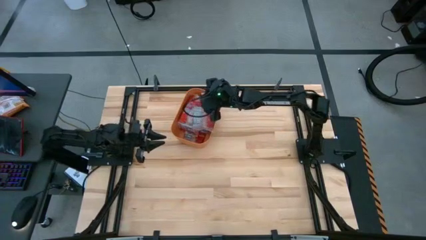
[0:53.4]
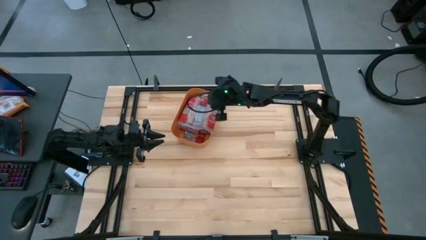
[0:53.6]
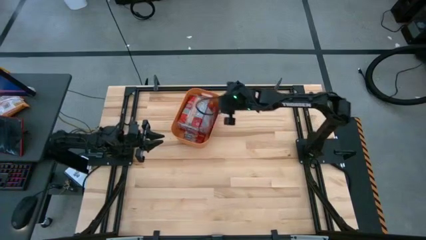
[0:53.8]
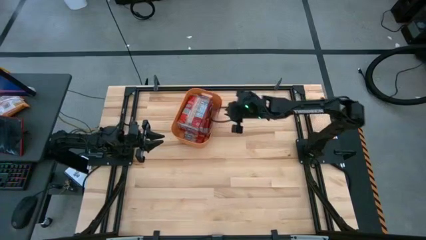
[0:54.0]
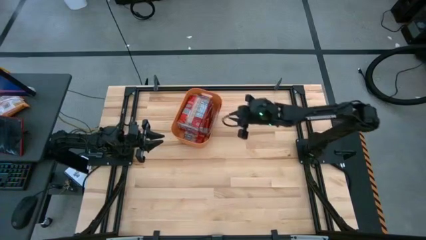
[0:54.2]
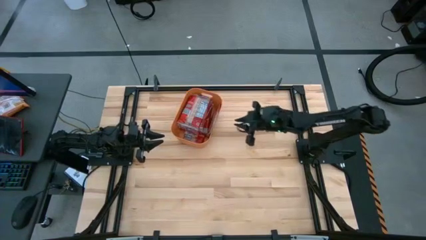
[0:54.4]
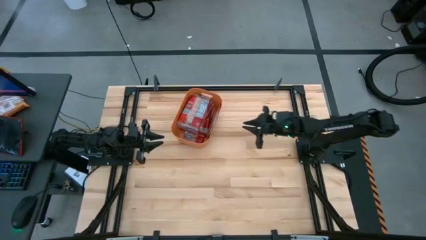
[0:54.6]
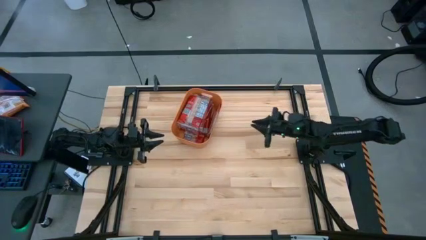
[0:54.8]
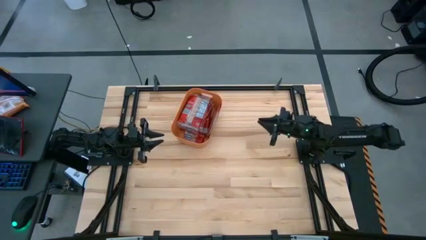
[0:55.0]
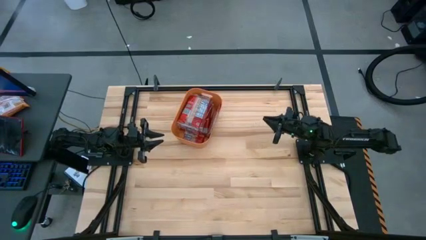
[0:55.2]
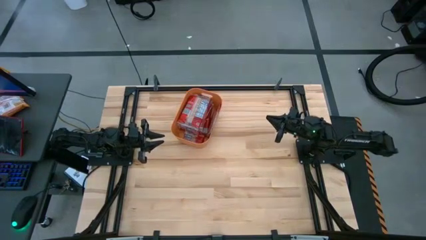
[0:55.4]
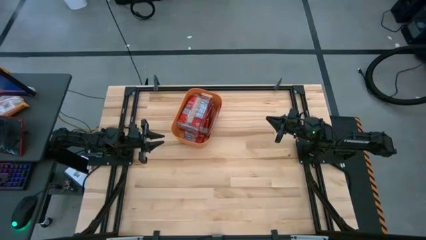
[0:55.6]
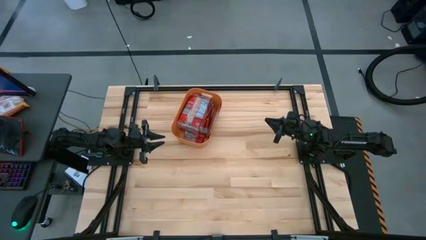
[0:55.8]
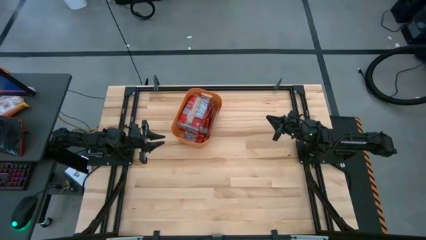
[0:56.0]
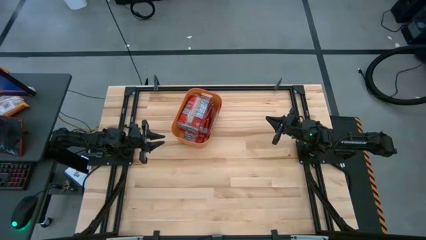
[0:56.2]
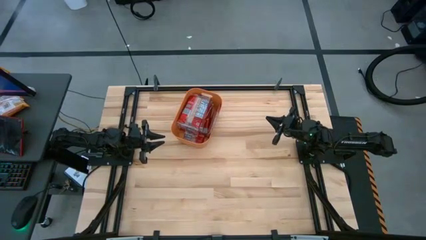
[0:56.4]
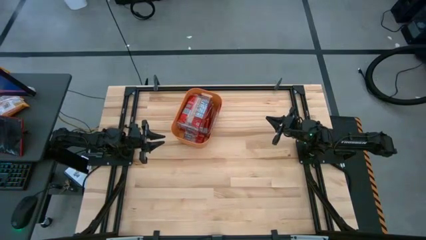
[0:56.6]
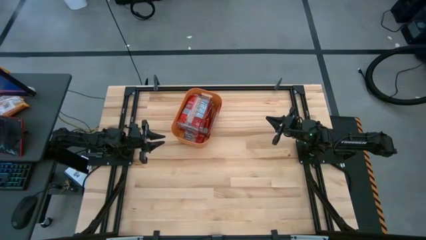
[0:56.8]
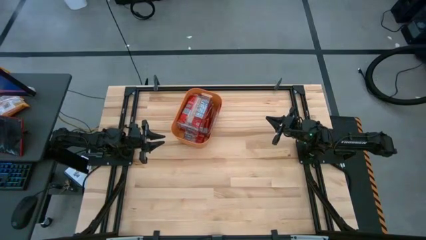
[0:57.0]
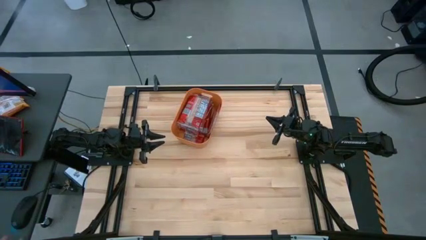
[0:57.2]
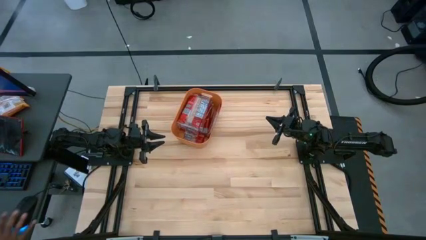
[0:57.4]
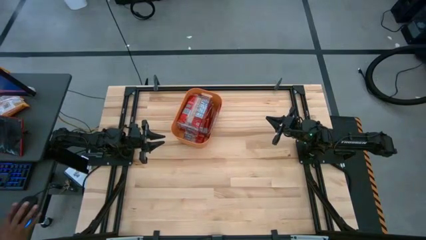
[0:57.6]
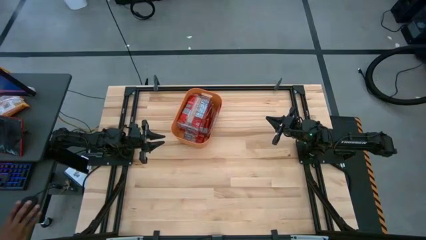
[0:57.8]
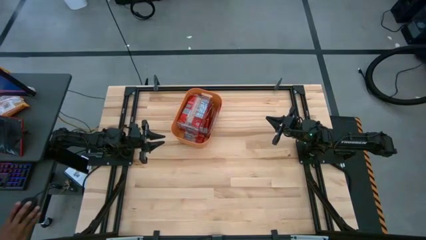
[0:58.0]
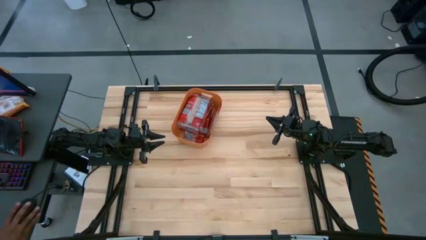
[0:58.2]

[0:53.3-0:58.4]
Task: Sort popcorn bags into baskets
Return to Home Position

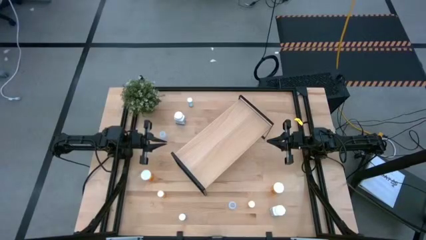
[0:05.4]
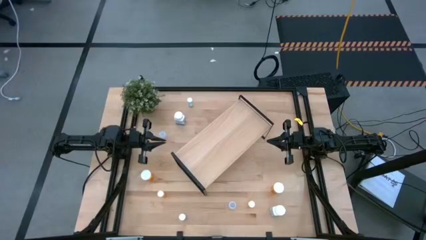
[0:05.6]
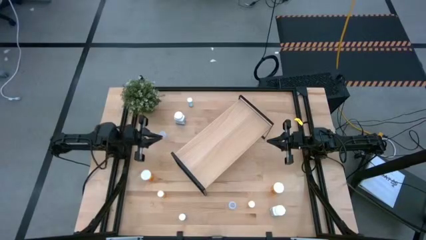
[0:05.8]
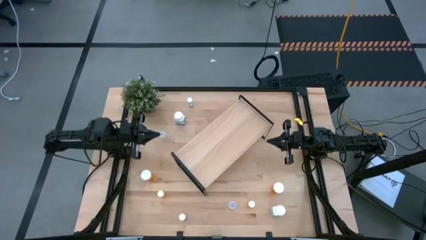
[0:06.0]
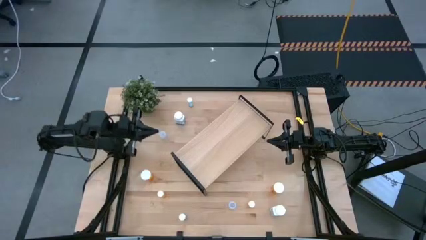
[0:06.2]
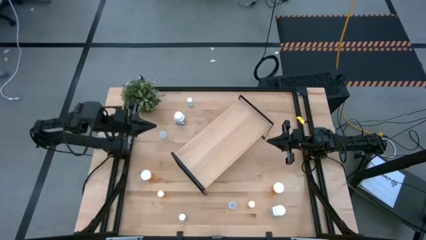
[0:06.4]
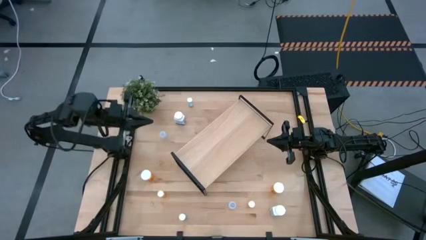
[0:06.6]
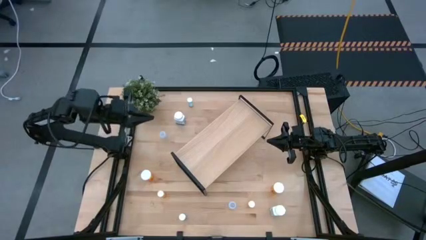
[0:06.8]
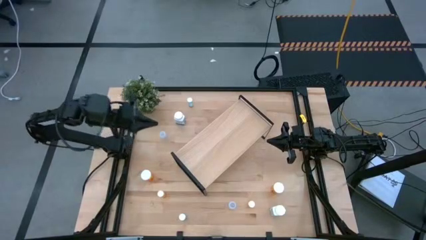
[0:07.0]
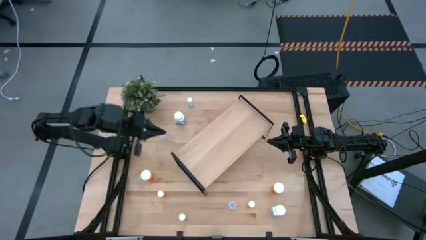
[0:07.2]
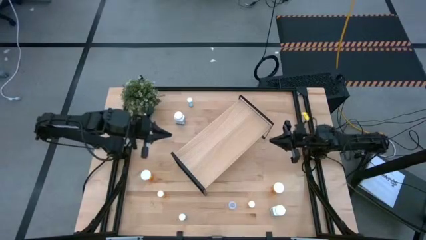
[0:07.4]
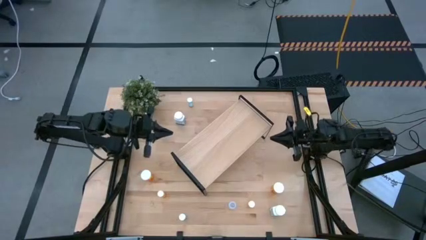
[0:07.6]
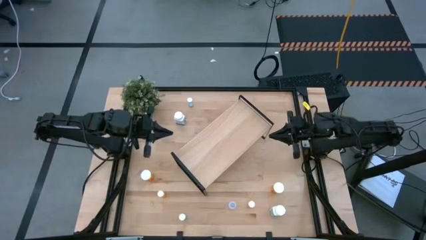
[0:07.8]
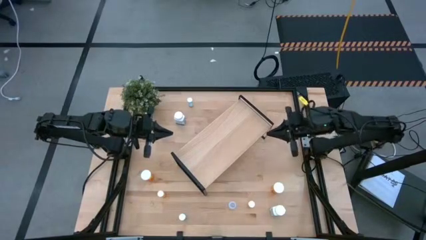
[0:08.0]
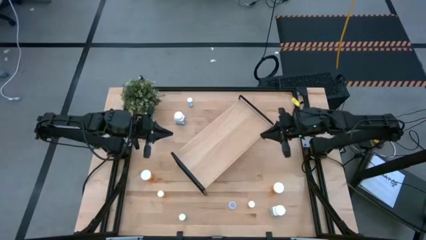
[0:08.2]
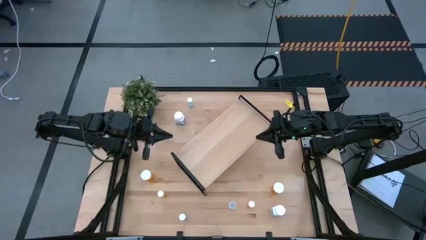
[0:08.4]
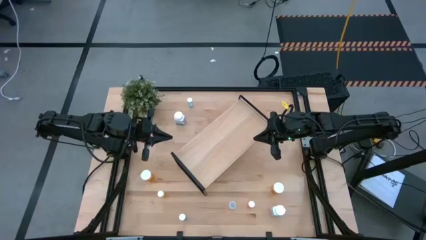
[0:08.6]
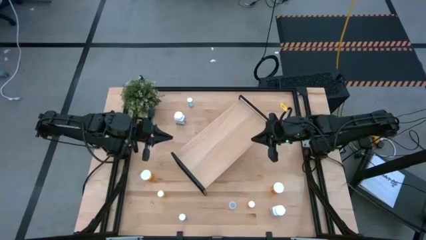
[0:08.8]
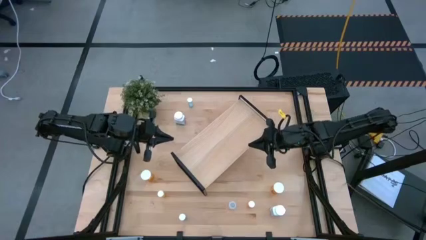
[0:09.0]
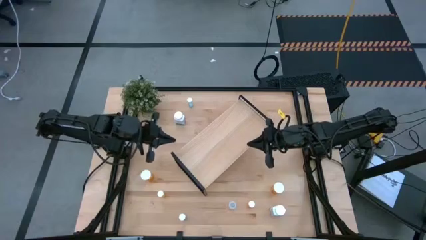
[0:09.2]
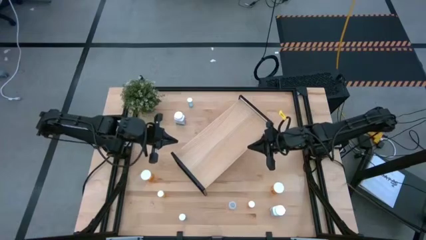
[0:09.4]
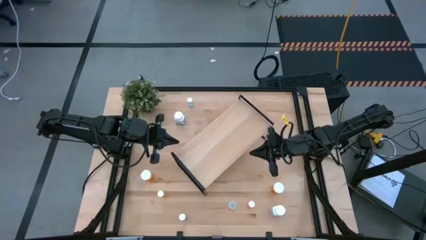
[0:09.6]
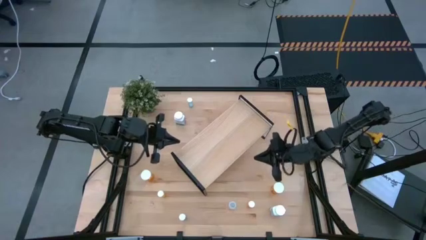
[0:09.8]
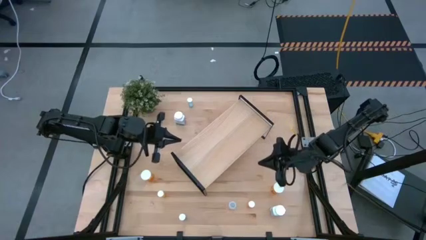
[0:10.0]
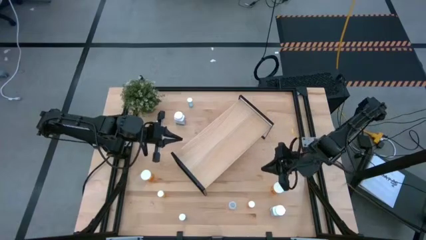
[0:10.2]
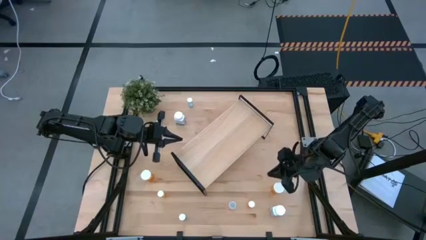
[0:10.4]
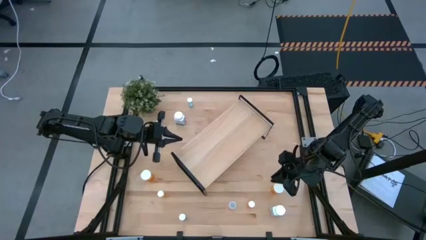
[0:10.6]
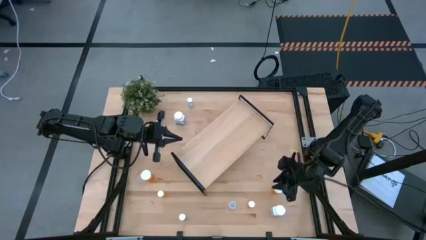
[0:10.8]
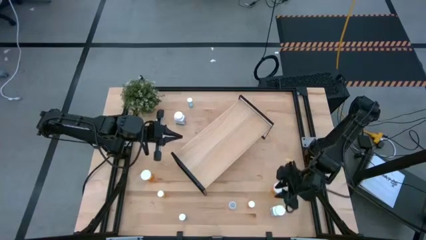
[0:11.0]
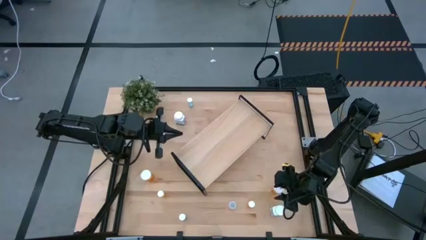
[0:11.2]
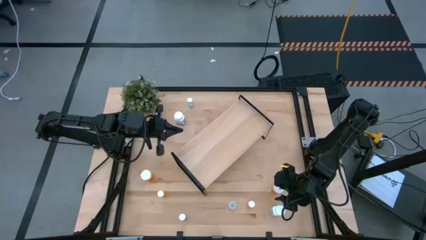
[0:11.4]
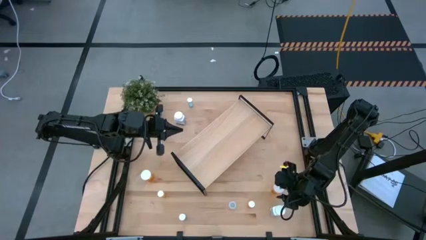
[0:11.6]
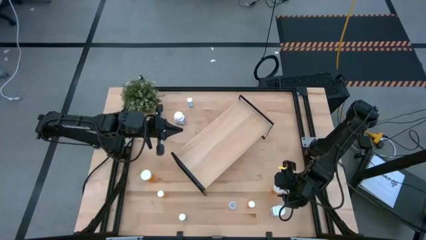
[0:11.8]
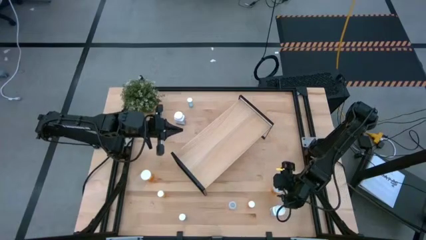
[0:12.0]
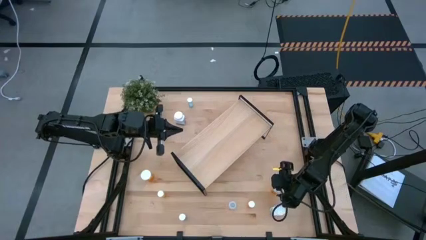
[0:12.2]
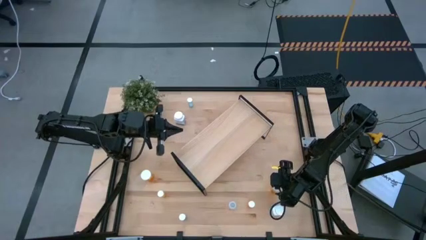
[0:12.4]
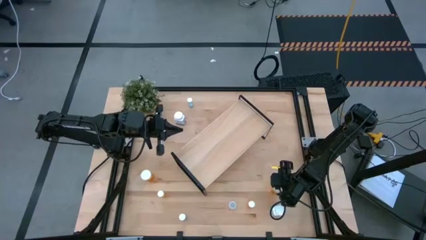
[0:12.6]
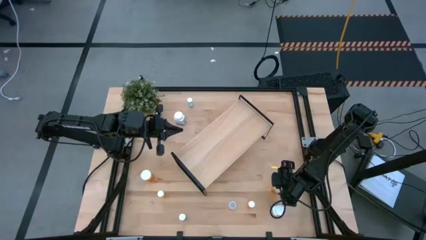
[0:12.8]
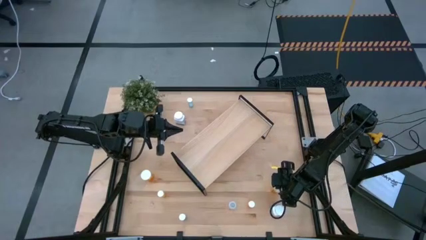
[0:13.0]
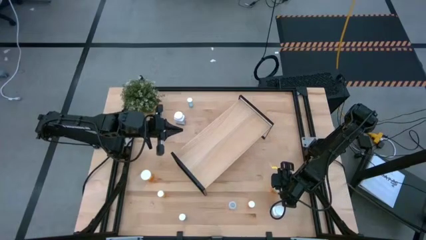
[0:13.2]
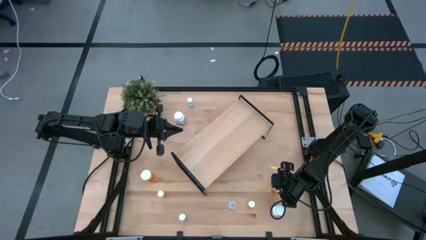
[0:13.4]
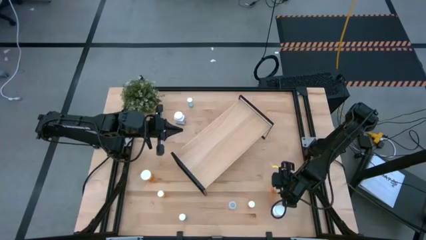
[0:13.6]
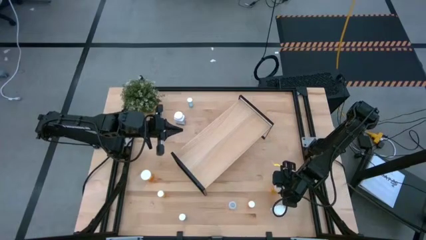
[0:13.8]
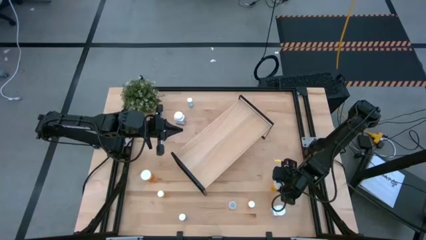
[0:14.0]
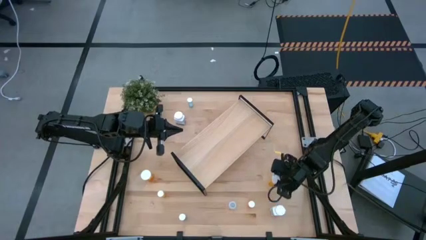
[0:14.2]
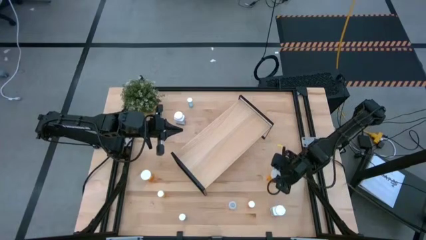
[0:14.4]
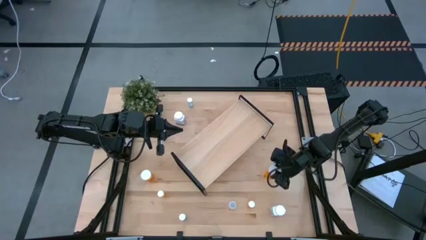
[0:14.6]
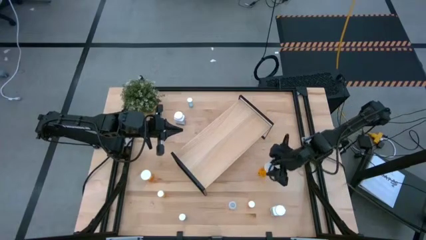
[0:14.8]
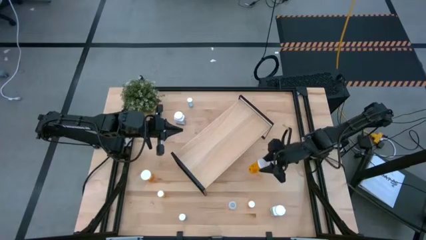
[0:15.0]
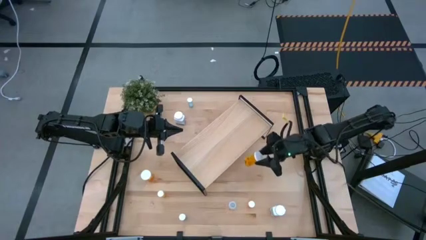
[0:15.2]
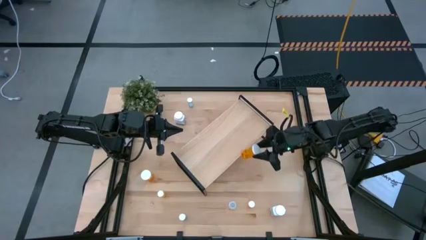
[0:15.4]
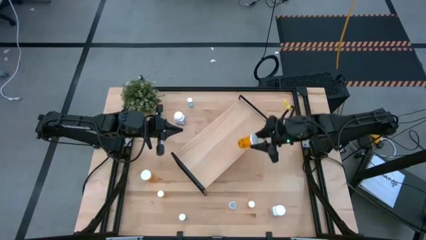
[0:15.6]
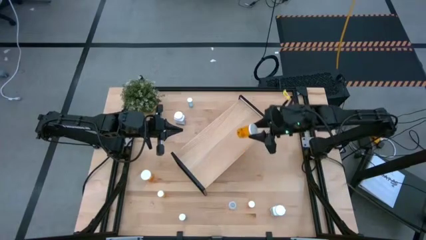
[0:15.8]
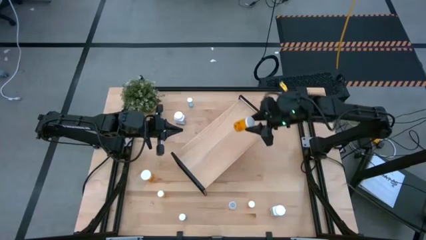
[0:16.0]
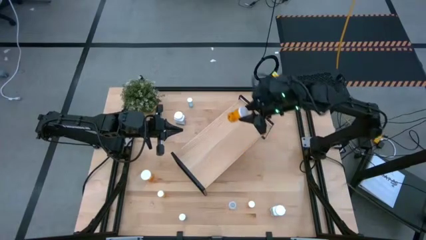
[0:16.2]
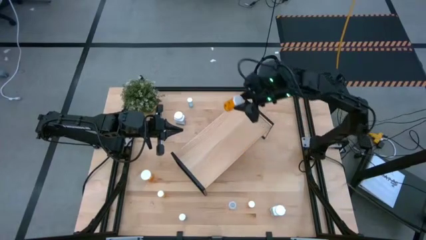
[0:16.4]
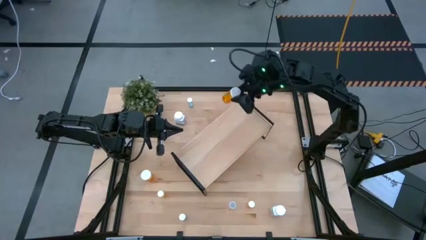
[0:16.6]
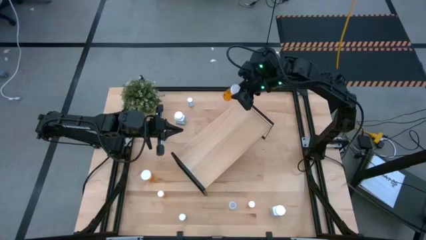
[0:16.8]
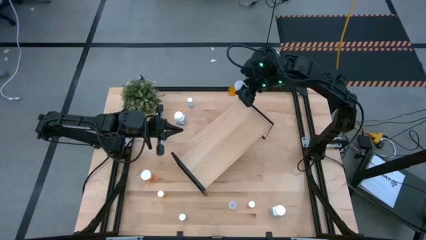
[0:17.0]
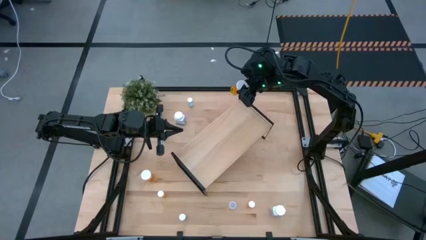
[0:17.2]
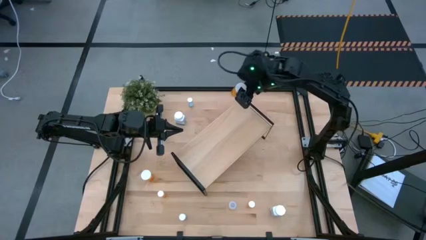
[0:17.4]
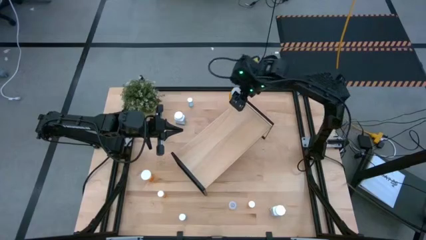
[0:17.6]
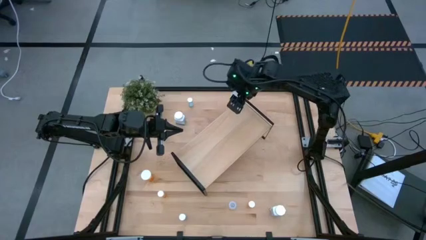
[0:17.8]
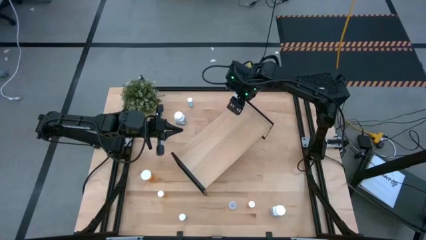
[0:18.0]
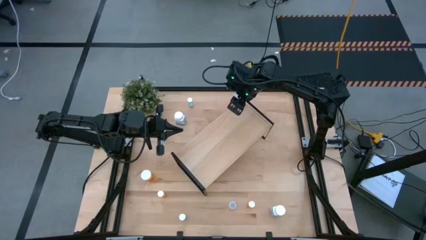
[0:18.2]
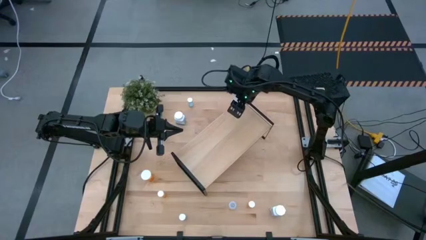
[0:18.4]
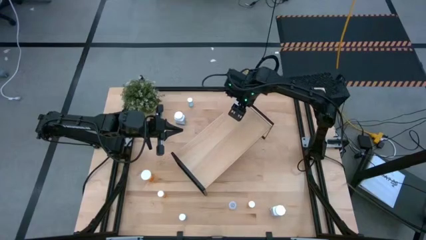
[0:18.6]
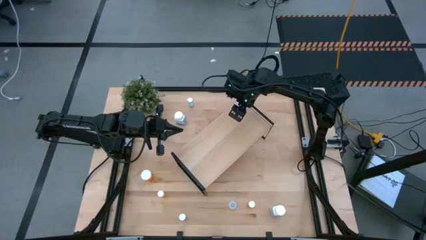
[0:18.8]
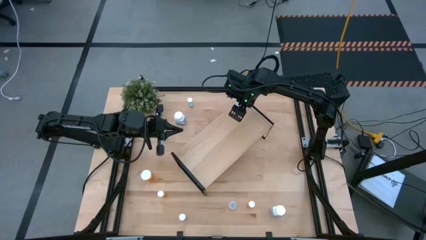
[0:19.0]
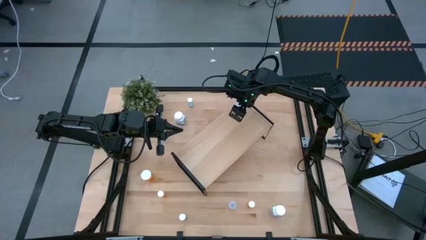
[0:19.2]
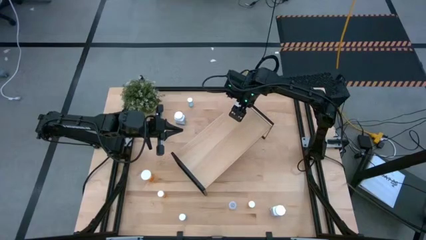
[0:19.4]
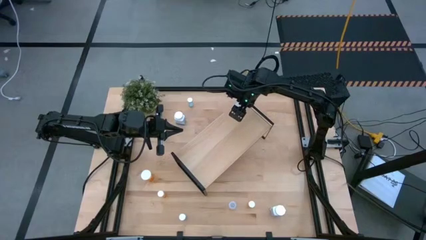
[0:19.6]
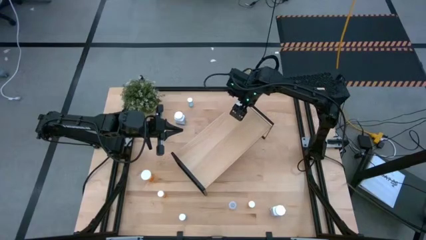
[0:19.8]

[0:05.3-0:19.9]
Task: Pick and place medicine bottles onto shelf by color
Put the right large orange pill bottle on the shelf
